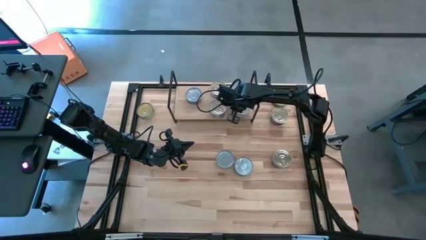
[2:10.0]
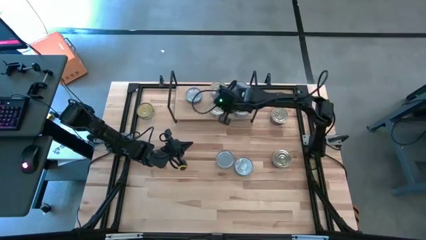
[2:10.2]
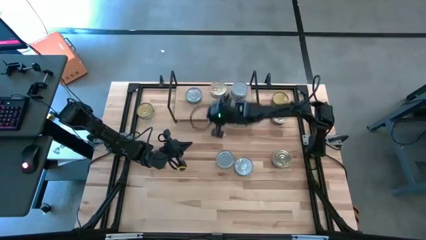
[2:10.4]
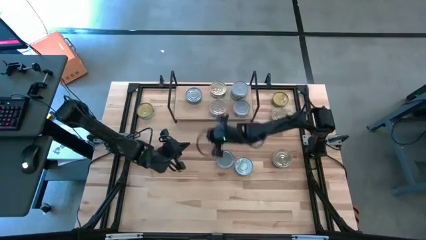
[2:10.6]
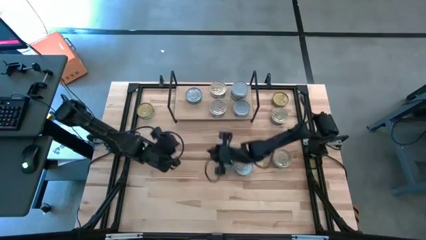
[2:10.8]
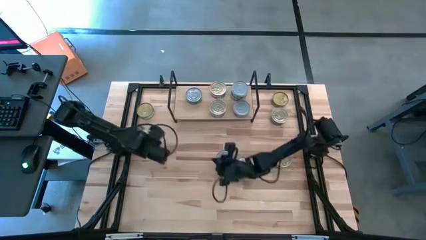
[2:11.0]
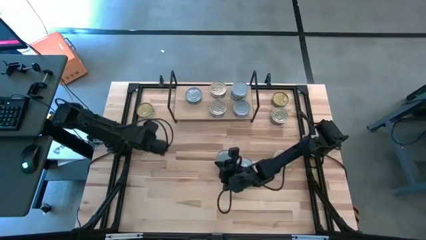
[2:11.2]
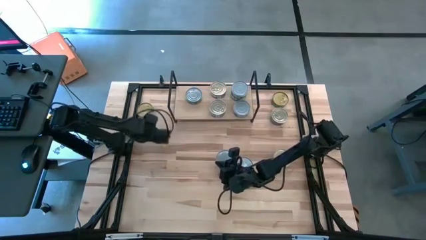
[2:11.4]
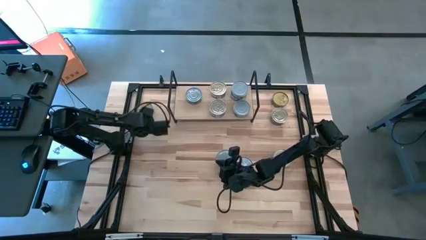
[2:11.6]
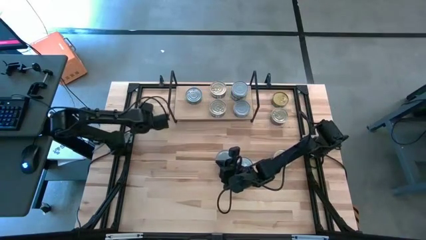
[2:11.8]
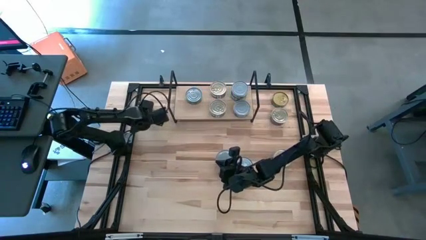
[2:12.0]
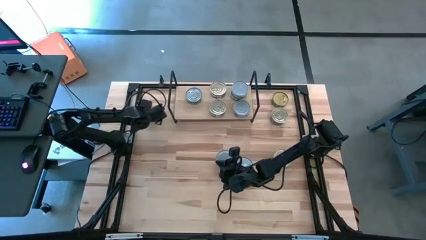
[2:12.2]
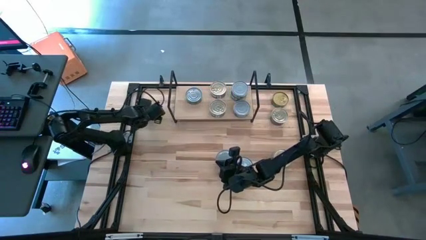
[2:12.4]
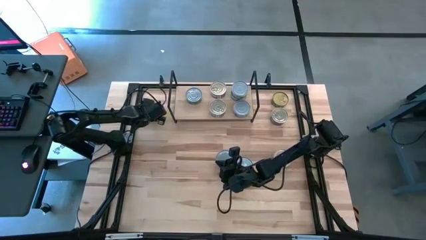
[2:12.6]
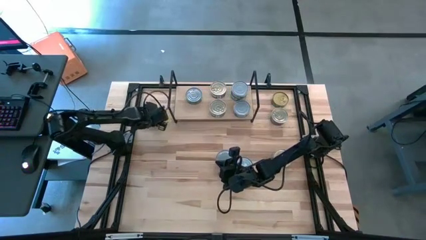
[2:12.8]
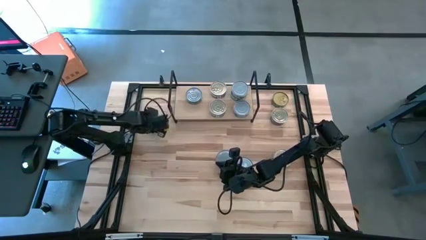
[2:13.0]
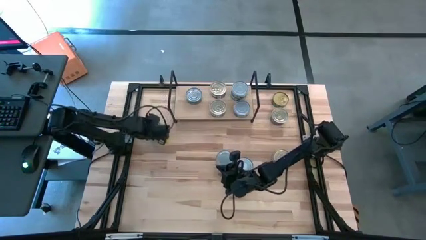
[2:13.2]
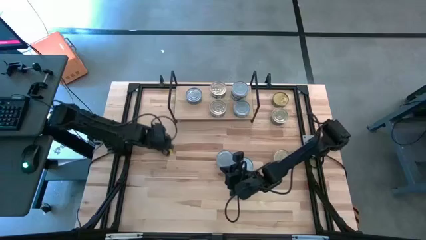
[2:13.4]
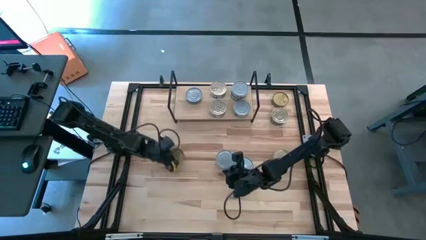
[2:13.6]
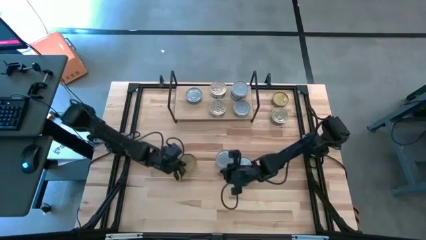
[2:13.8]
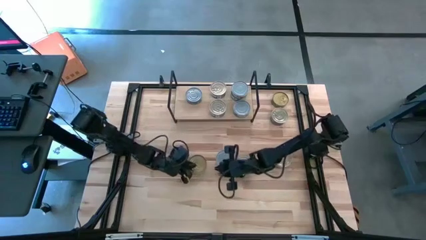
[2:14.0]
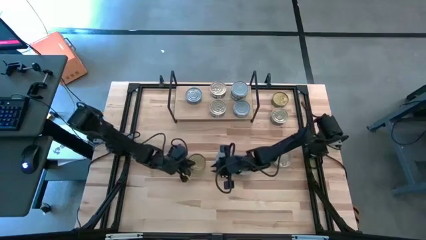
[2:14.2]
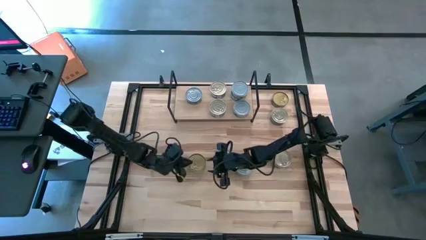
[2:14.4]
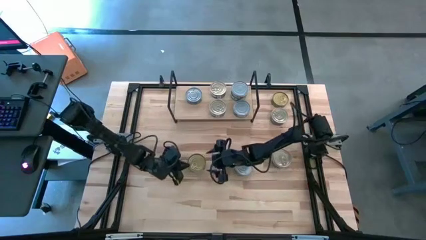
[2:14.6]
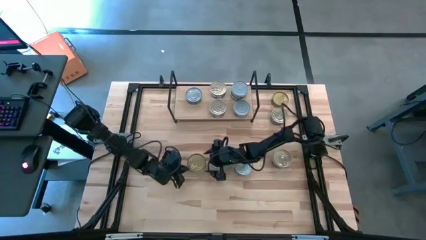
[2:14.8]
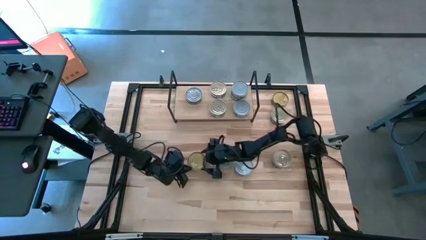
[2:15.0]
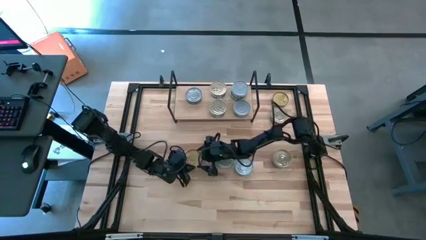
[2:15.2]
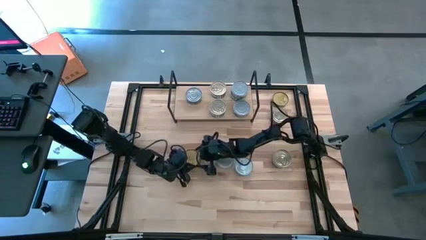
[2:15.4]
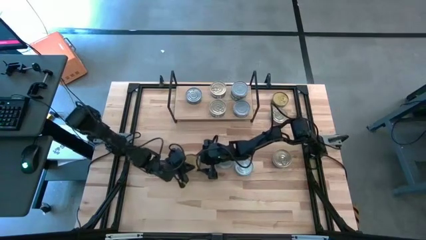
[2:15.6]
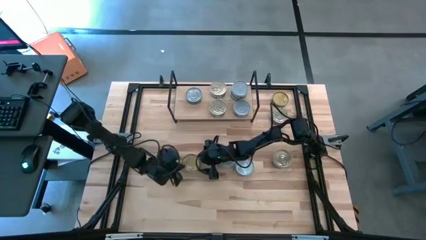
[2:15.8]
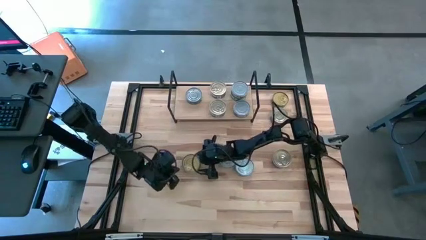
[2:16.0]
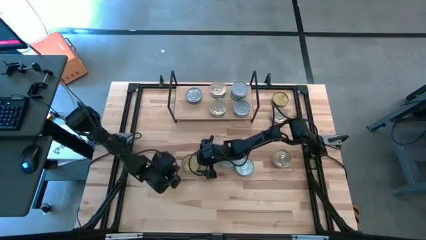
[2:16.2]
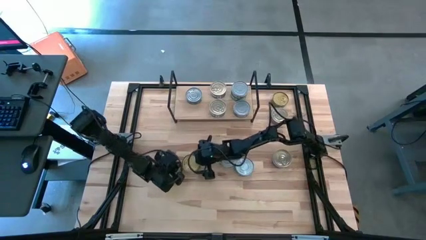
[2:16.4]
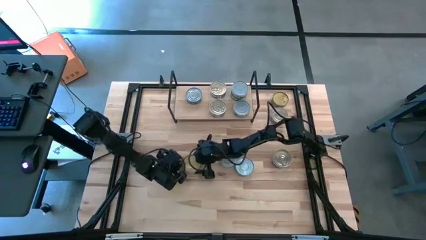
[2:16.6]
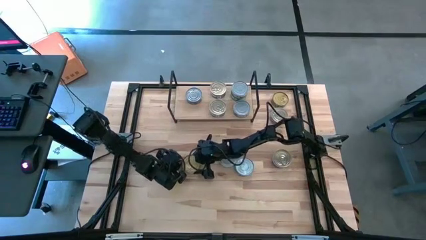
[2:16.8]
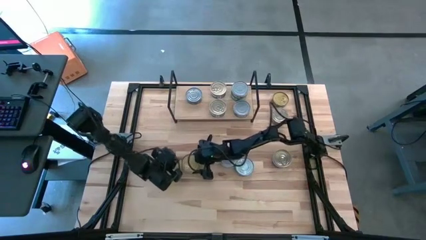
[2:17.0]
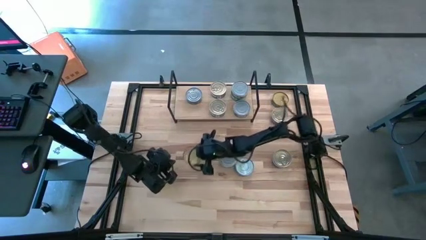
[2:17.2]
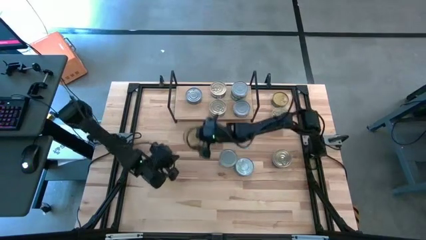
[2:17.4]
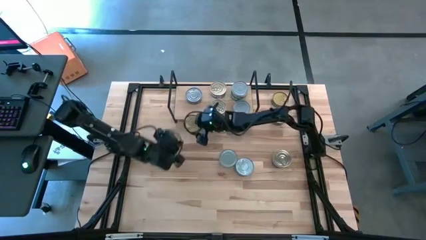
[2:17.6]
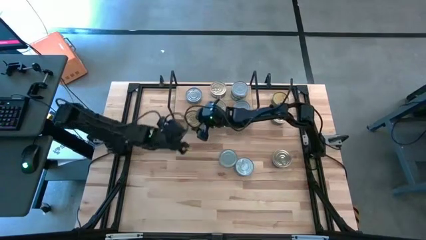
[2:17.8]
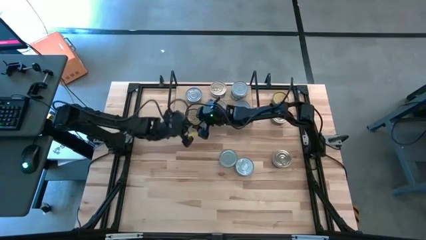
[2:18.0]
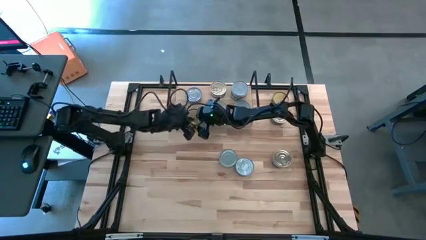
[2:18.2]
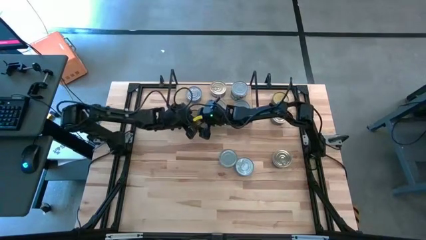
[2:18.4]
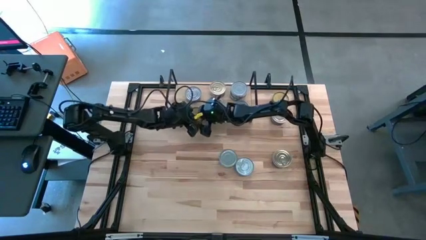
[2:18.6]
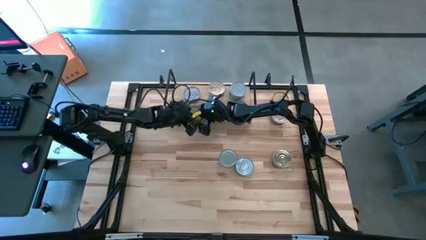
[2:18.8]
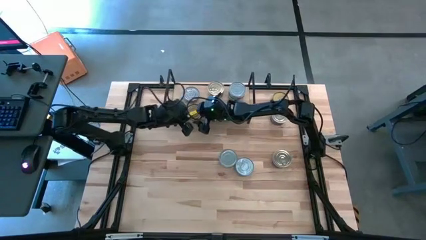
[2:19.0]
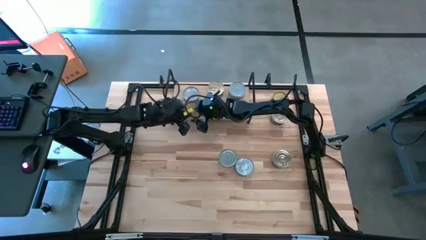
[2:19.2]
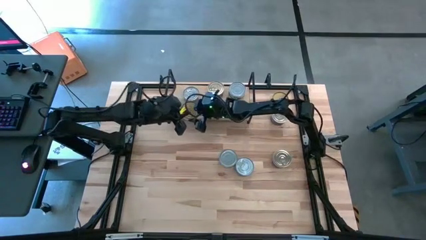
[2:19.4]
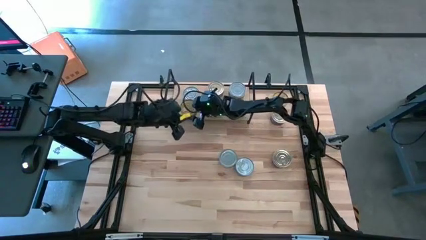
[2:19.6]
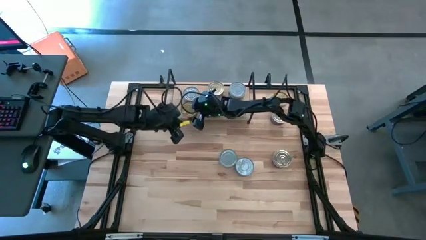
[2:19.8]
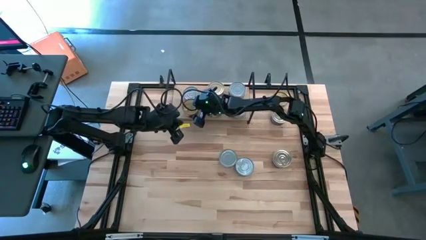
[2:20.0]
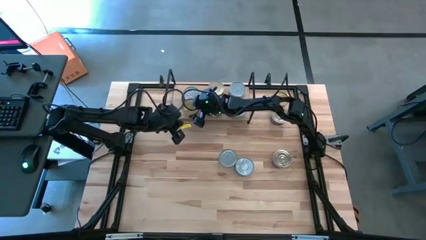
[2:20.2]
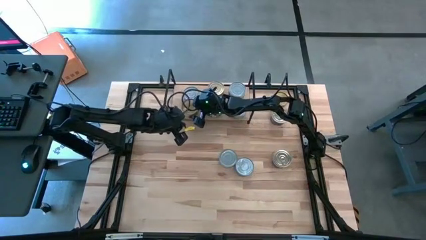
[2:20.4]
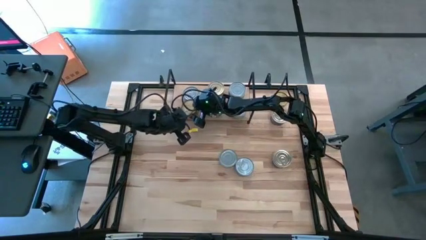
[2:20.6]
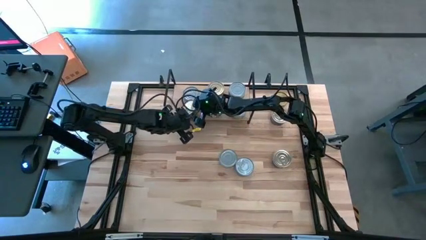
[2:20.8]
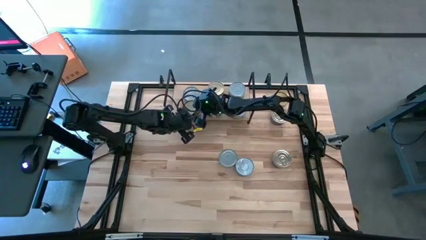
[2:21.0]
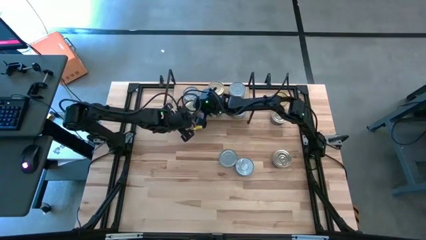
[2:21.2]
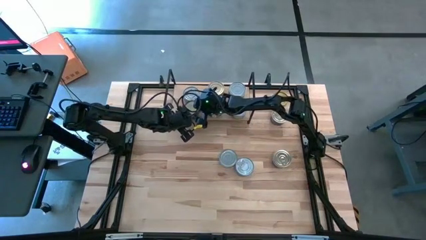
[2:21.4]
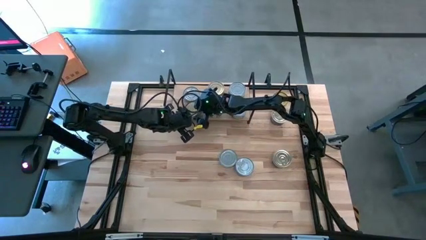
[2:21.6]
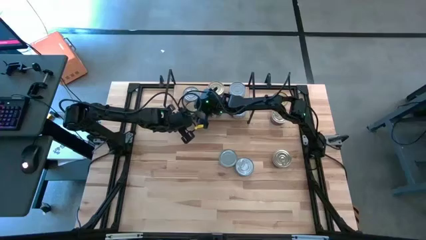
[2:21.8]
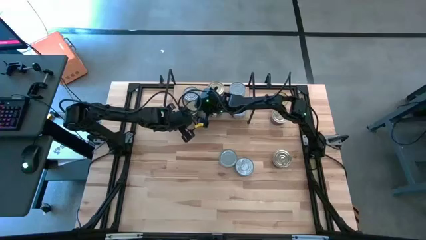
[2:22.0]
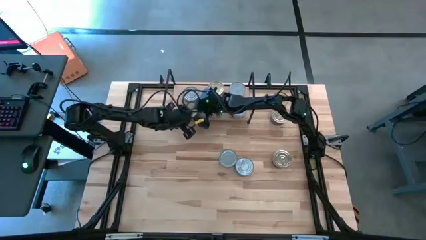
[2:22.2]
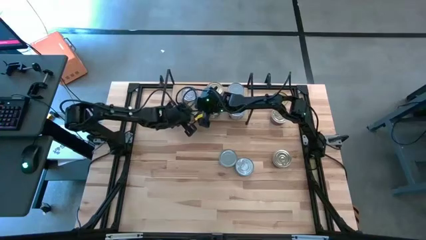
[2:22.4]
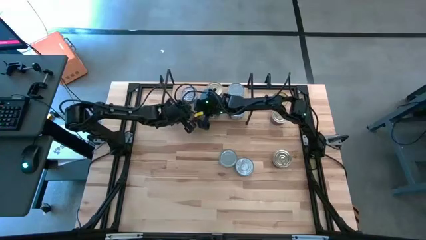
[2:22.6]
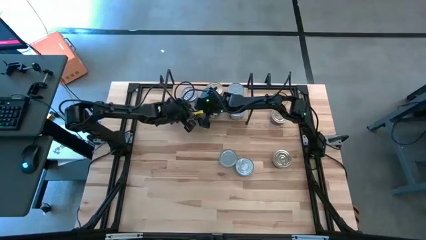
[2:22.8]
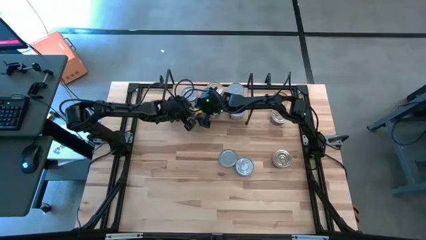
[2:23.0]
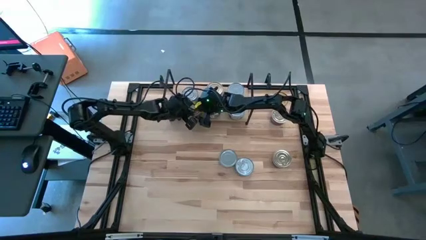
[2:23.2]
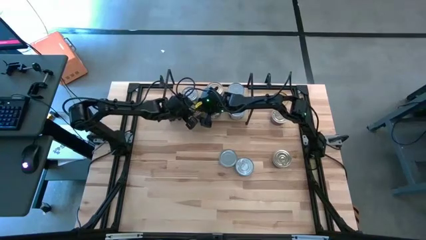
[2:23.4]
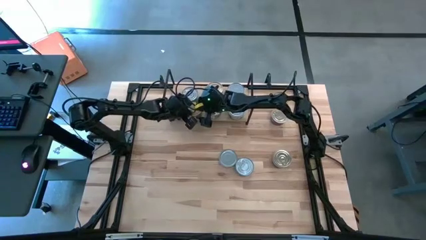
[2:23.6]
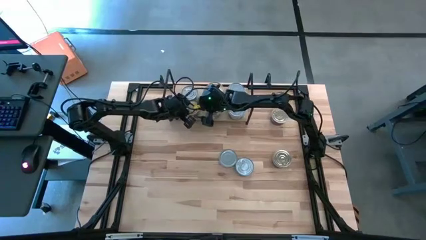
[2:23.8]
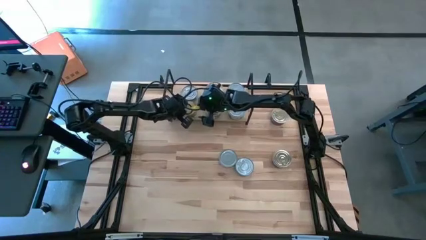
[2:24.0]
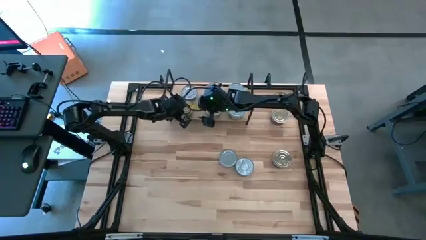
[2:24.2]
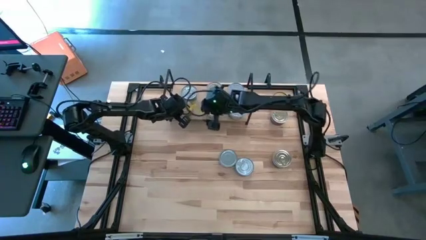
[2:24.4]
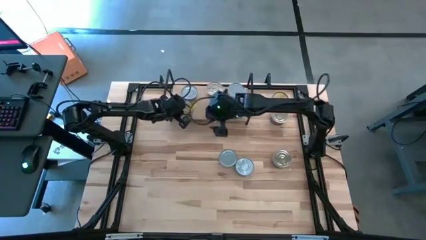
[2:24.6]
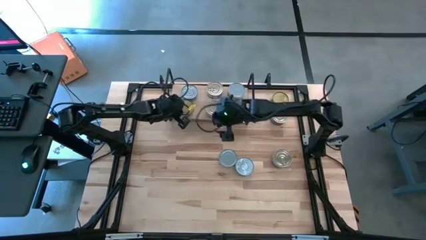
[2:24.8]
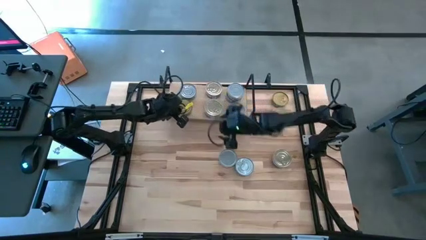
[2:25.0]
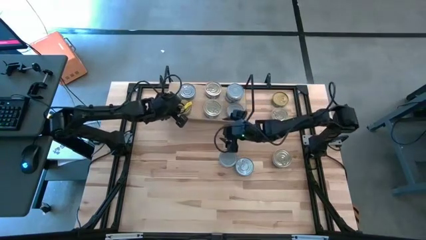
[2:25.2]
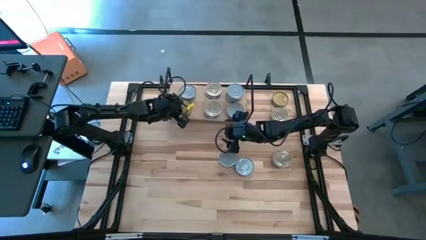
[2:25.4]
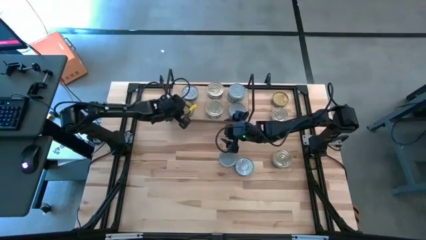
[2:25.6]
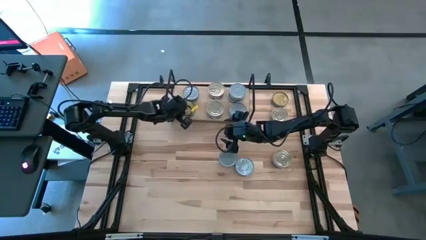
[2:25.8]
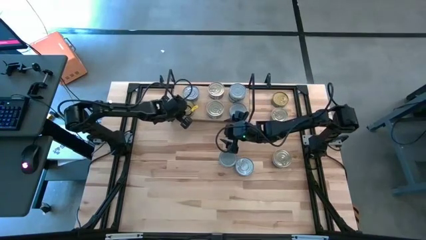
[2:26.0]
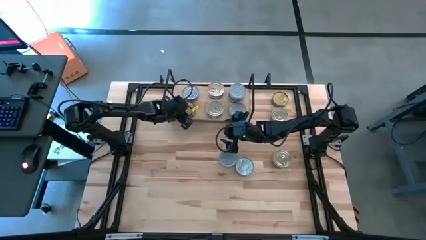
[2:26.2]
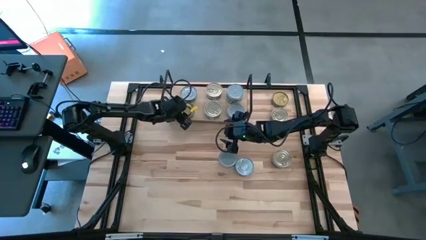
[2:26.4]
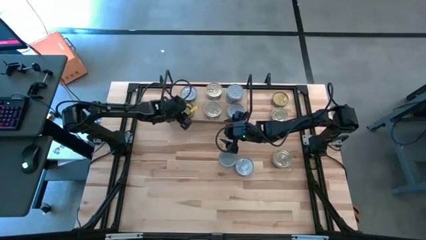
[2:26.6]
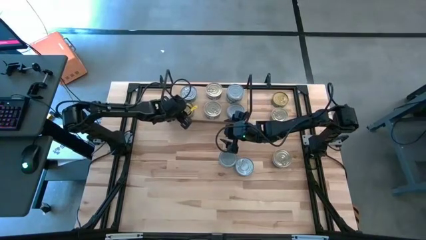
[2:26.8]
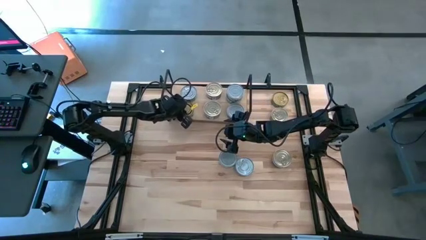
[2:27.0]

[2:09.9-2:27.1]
Task: Stack canned seafood by type on shelf
Put the green tuna can on the shelf
